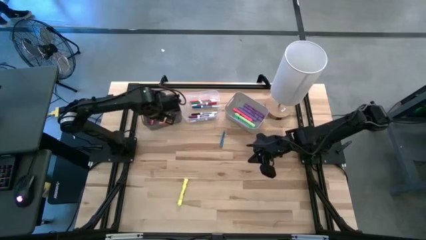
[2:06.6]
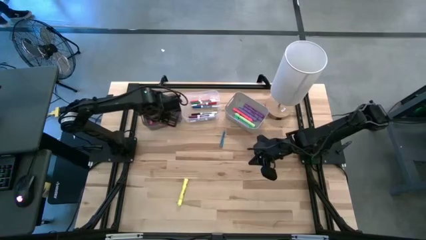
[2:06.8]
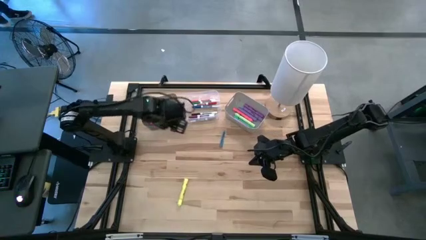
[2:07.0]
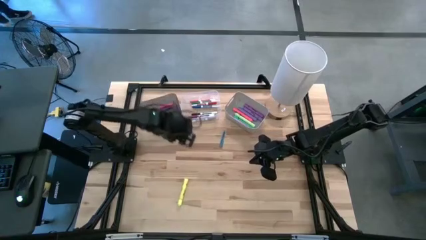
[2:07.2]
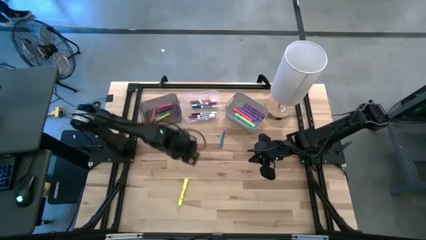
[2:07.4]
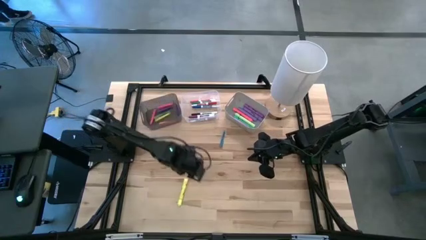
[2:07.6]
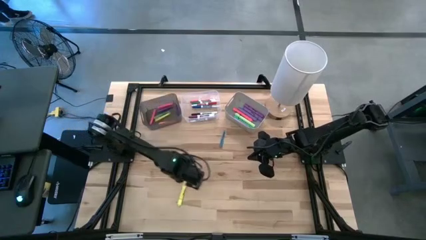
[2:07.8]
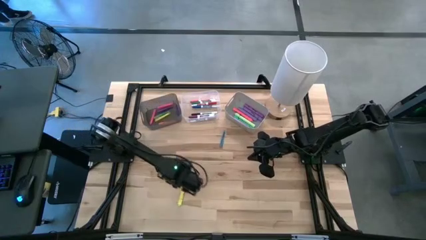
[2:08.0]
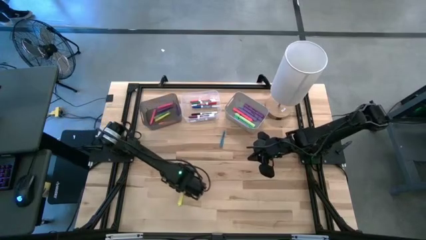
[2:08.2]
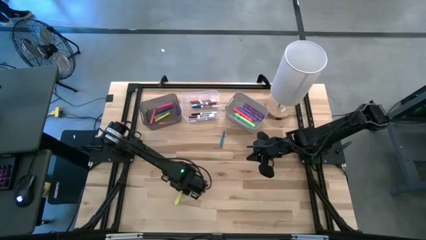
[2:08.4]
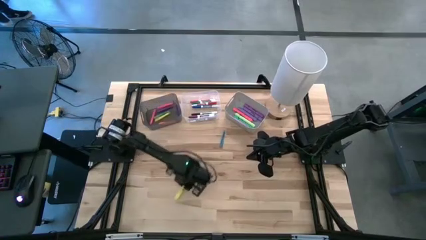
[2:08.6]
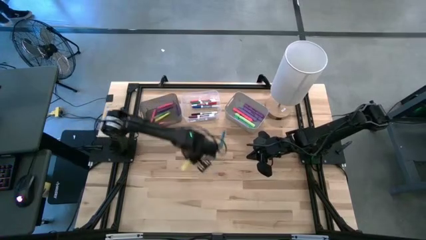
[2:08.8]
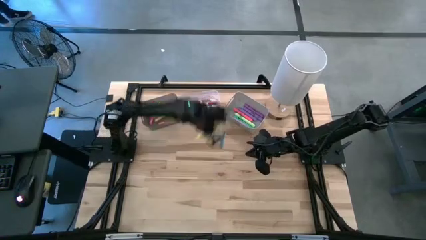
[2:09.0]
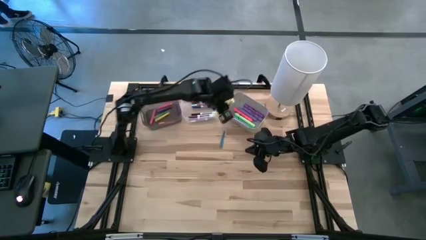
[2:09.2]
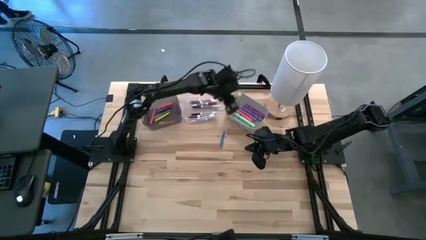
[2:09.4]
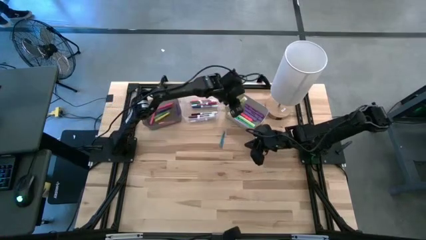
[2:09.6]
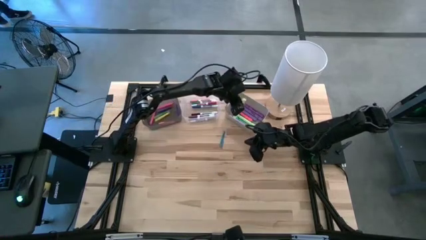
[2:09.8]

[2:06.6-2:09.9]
Task: Pick & Place Markers
Put the yellow highlighter pen into the gray bin

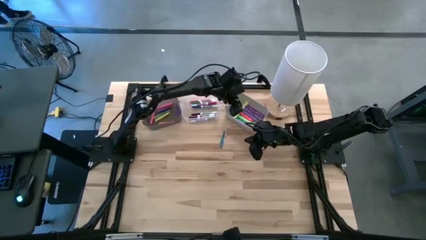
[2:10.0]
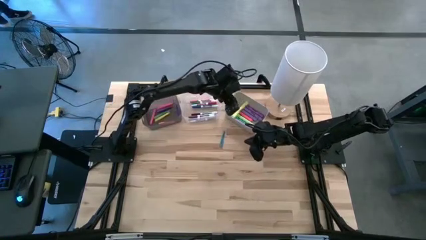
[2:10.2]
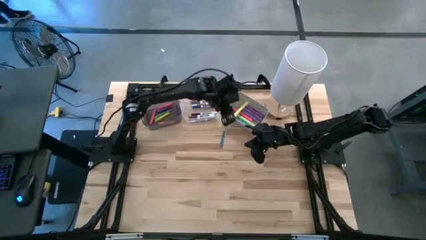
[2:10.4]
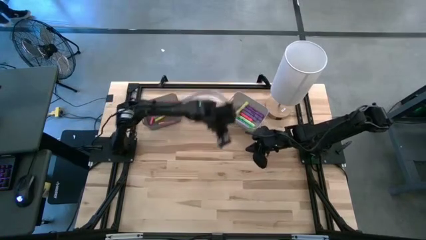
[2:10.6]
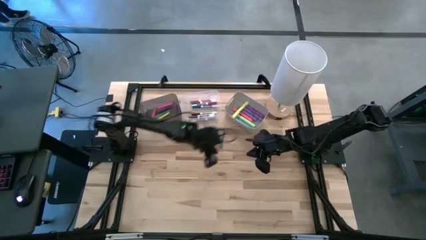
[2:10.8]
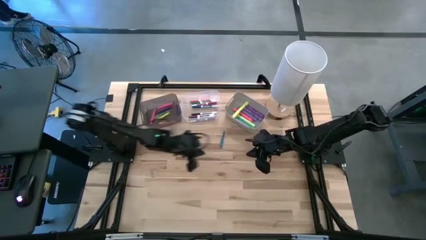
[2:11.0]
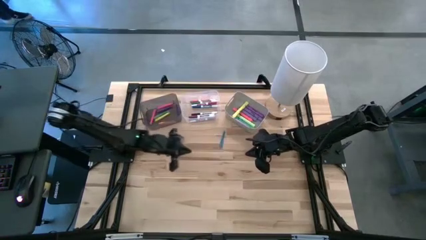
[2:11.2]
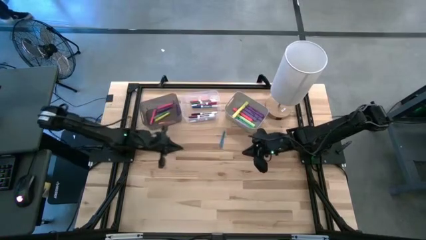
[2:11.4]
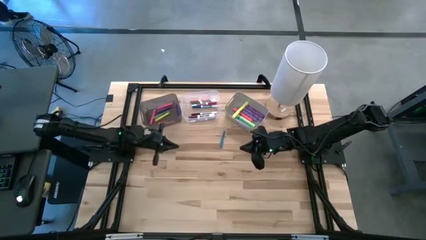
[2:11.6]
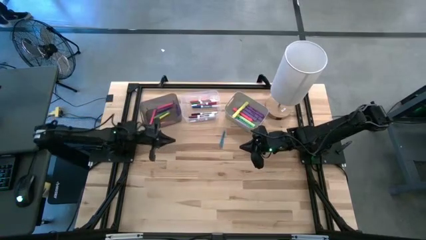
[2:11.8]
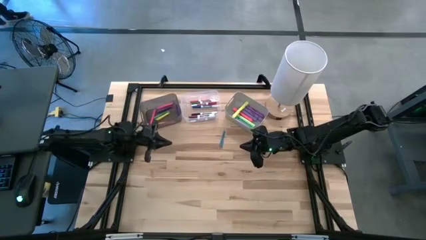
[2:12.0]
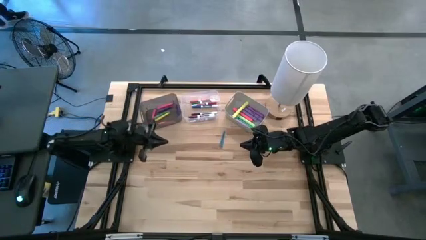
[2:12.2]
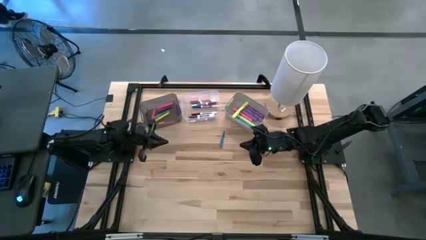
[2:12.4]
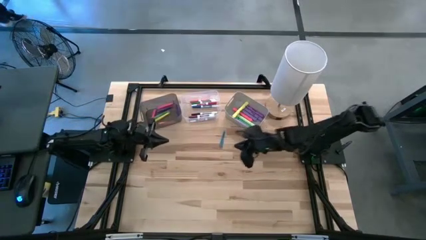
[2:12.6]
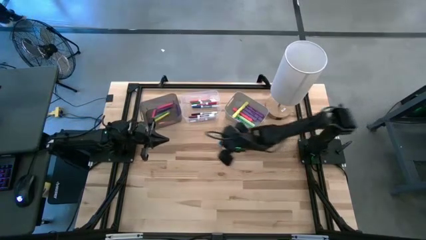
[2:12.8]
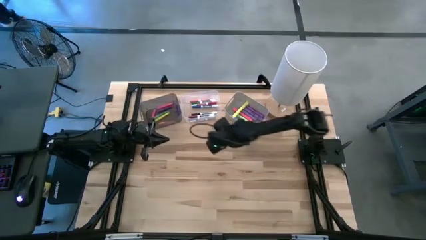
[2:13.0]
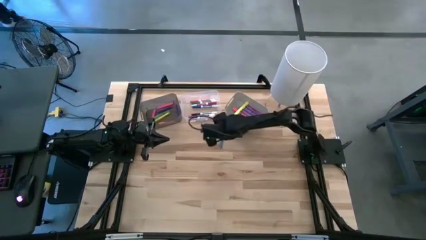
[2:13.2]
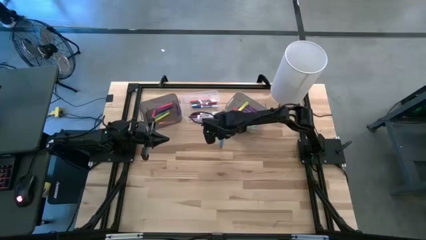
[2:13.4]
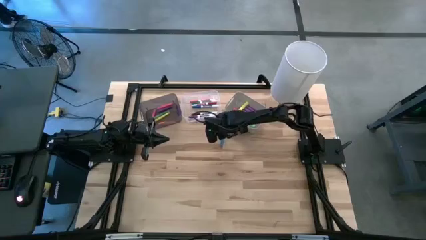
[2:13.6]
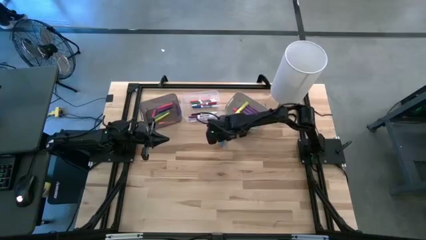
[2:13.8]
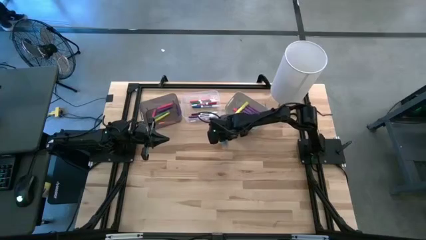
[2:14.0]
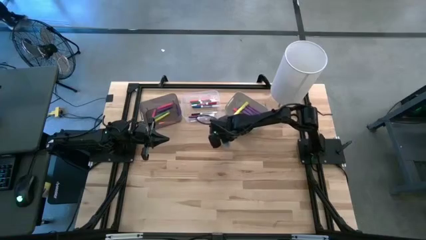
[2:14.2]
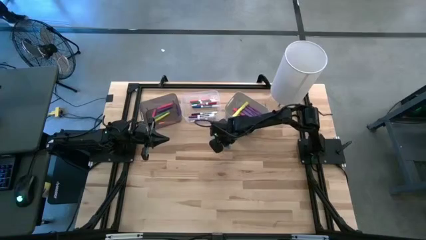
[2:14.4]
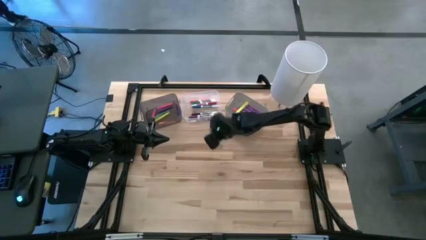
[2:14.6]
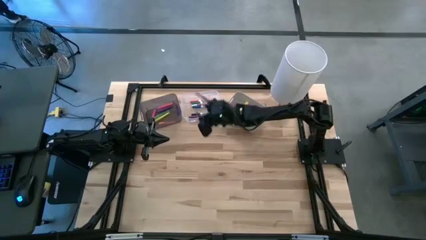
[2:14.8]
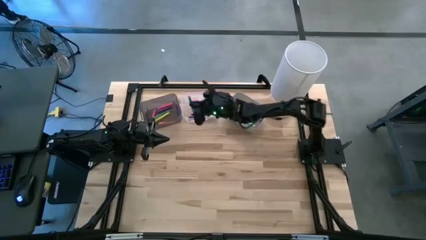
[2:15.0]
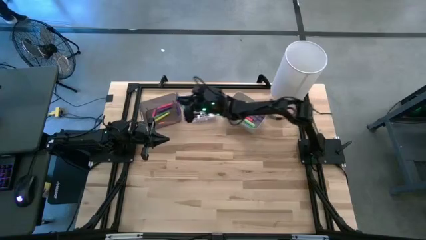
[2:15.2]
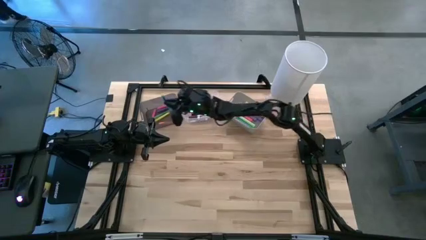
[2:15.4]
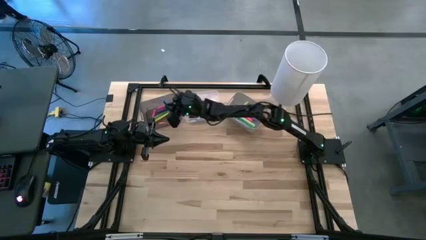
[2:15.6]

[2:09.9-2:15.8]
Put the blue pen into the black bin

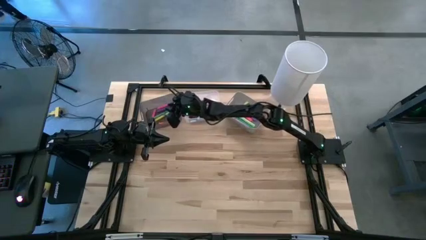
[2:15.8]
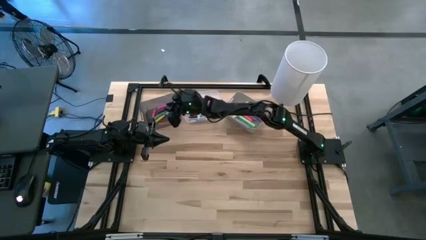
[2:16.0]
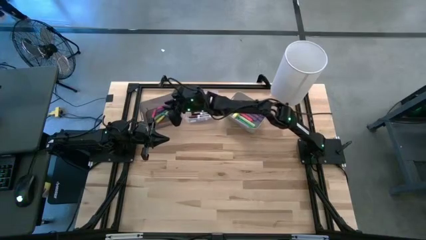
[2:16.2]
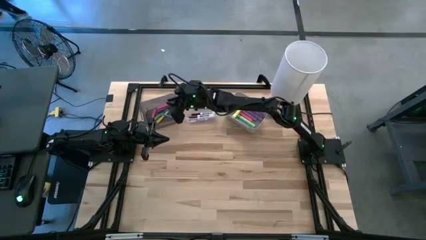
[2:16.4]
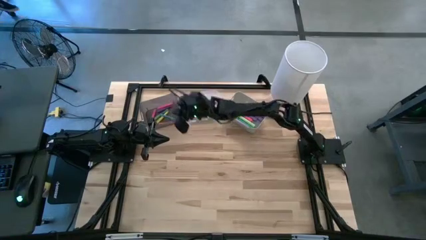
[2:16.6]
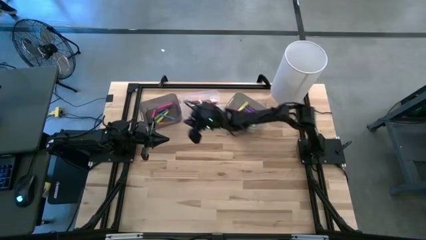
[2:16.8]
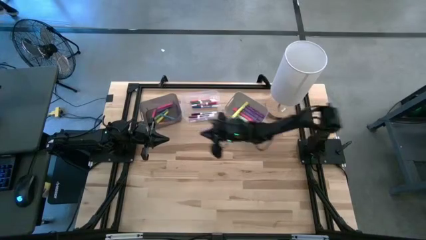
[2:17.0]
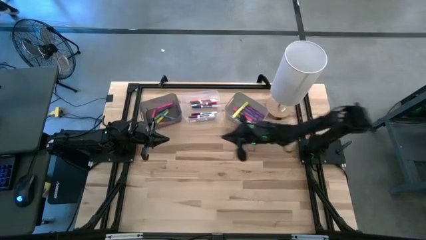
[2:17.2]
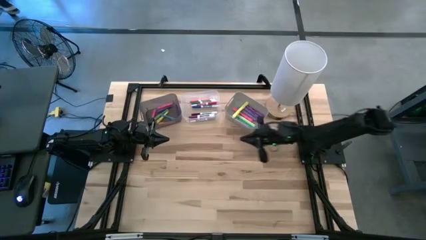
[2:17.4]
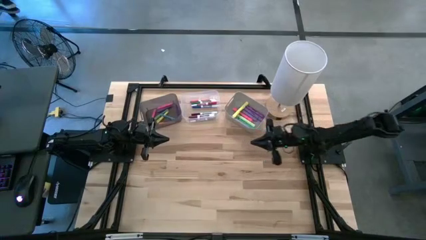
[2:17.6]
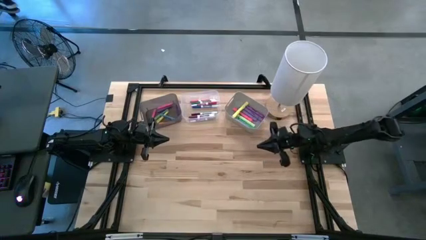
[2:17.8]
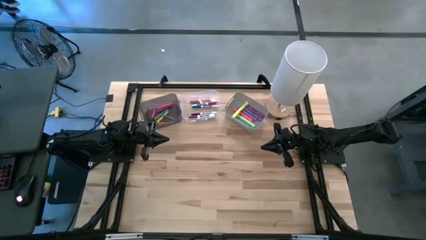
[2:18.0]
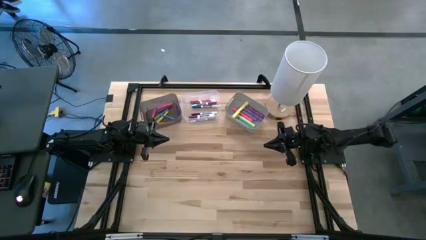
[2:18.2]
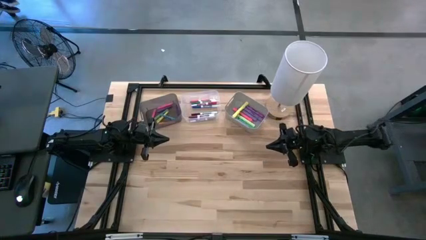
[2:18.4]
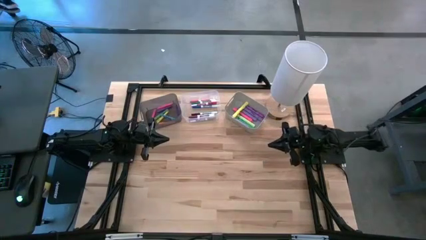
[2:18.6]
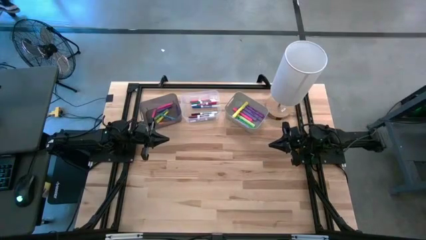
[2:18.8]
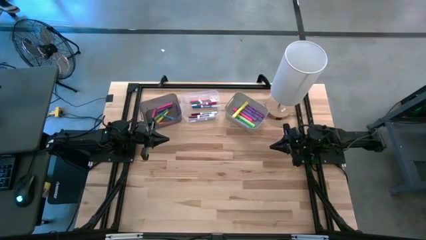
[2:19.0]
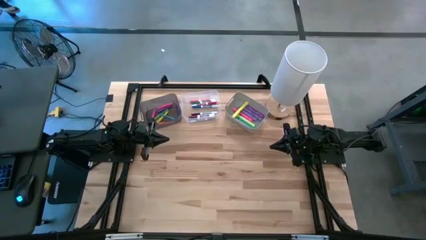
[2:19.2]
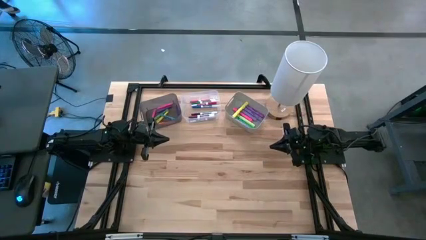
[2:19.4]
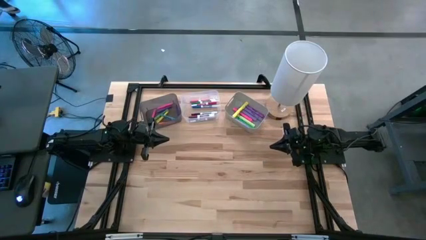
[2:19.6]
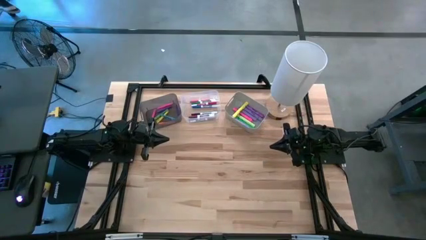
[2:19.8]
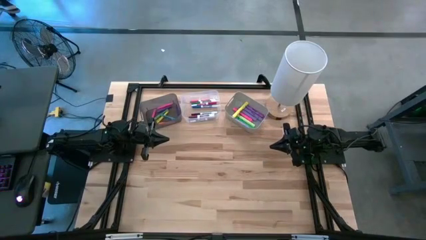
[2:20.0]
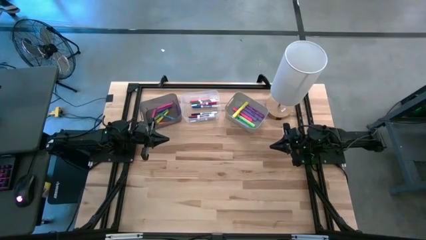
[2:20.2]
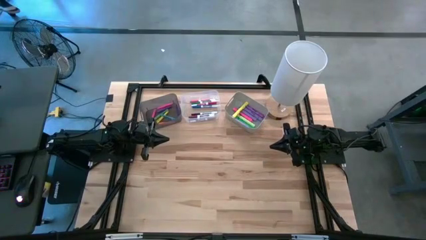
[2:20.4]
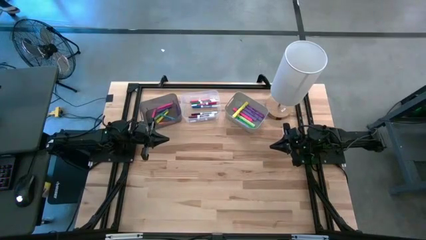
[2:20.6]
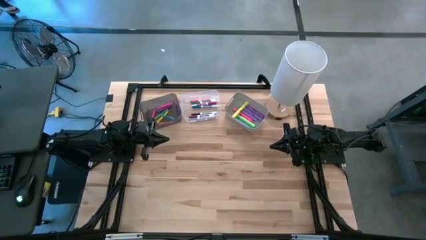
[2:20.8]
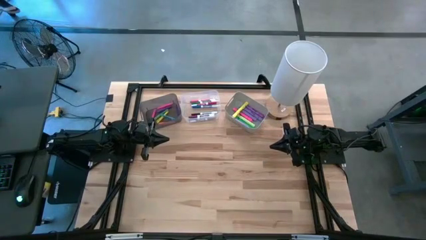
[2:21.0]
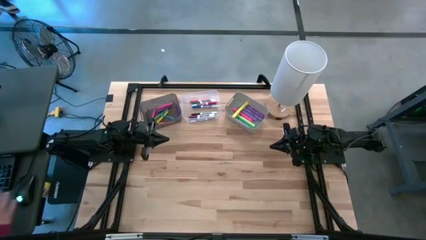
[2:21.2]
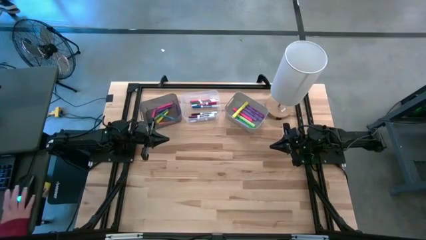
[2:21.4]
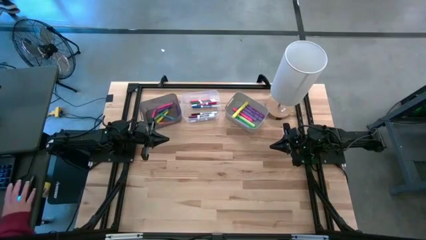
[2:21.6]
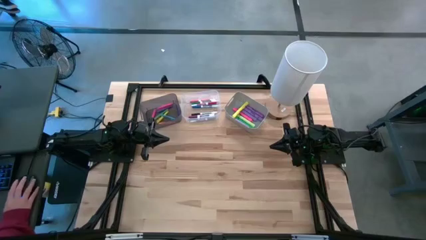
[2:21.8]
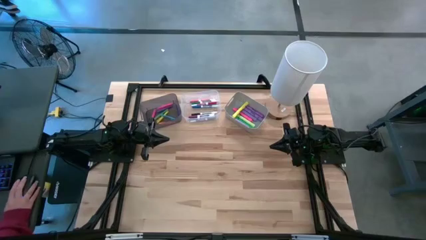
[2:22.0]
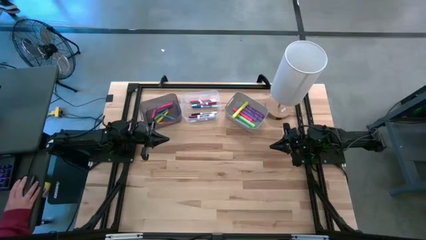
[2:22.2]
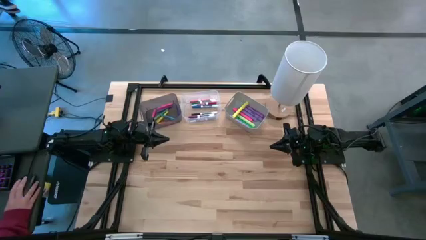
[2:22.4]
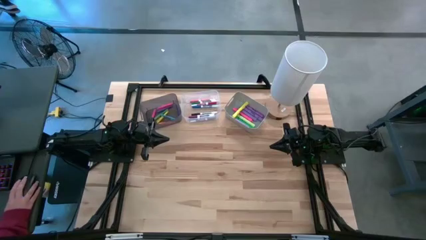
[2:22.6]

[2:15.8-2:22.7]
Return to Home Position

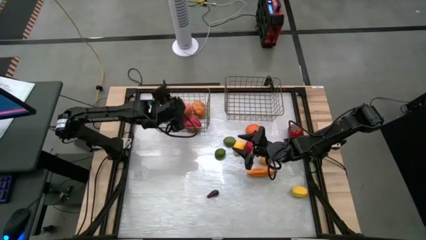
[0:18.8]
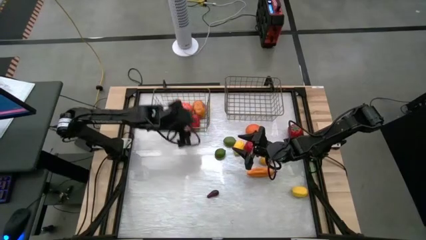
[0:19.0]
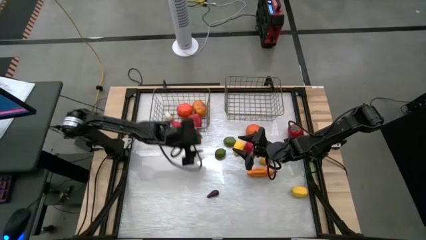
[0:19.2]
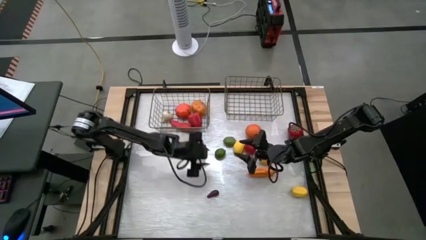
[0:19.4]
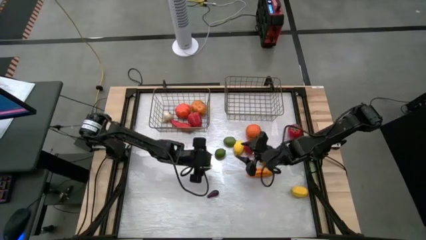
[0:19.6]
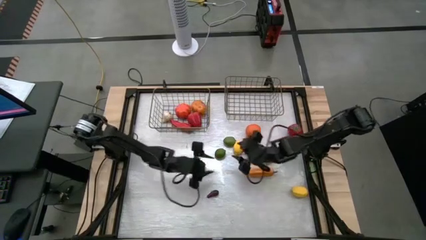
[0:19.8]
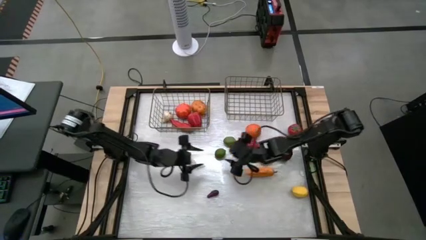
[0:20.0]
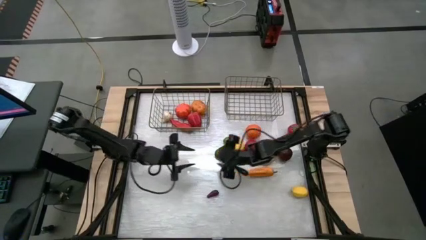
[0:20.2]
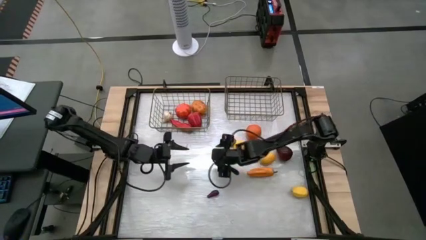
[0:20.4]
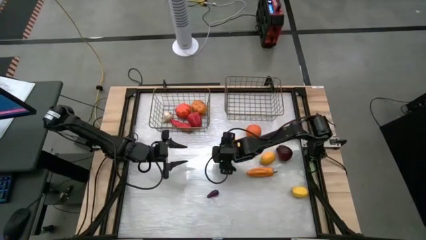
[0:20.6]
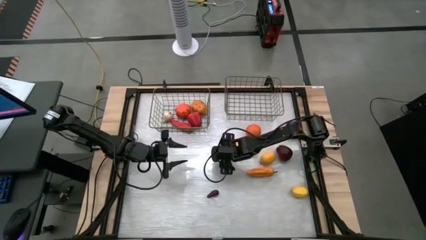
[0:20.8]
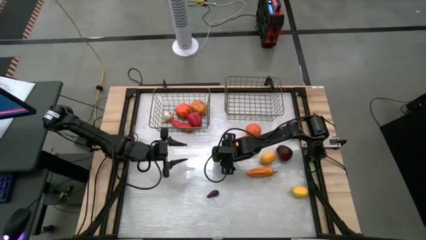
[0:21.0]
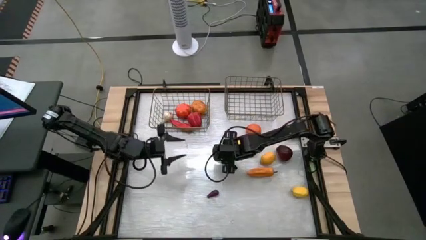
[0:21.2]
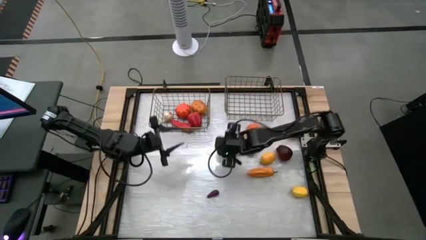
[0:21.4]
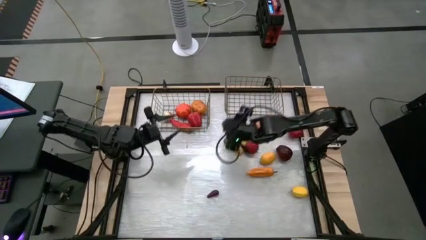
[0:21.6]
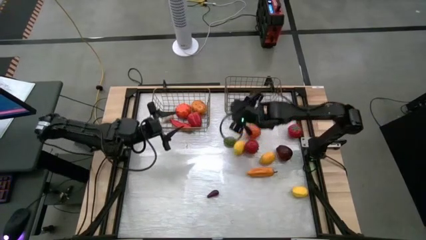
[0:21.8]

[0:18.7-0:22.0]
Task: Sort produce into baskets
Put the bottom green lime into the right gold wire basket
